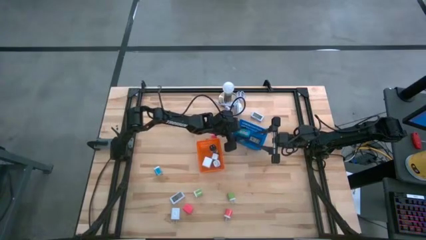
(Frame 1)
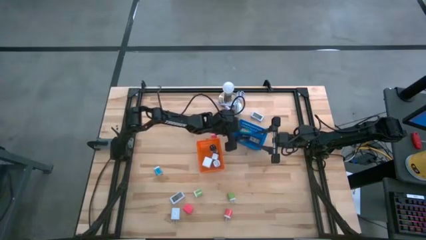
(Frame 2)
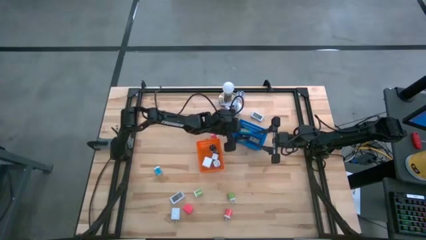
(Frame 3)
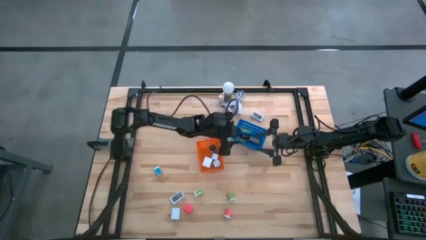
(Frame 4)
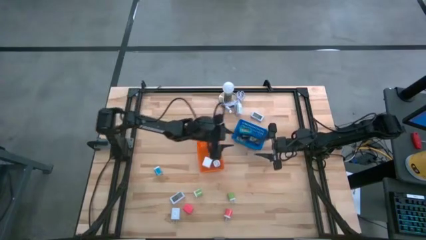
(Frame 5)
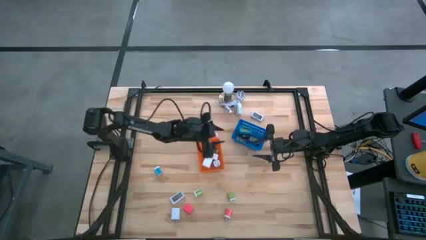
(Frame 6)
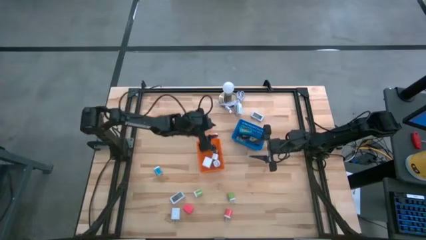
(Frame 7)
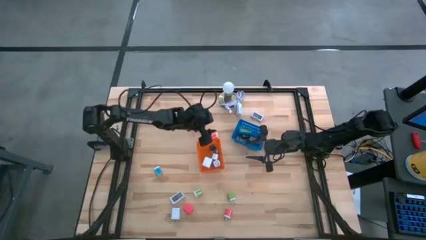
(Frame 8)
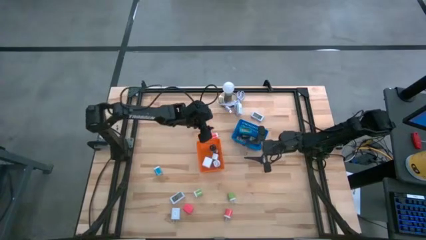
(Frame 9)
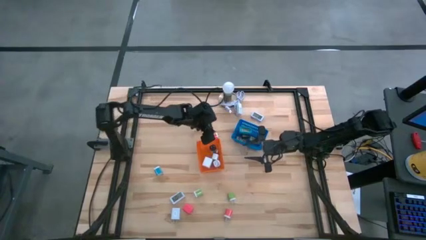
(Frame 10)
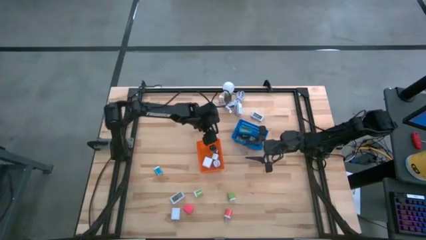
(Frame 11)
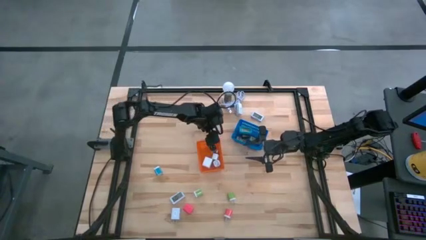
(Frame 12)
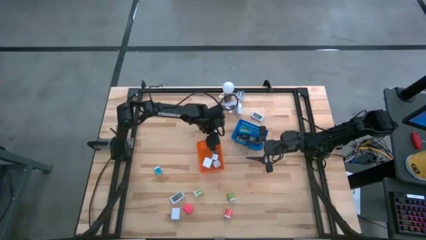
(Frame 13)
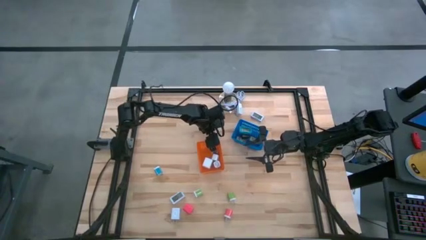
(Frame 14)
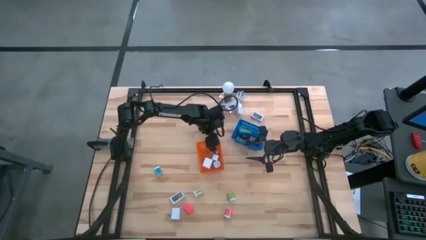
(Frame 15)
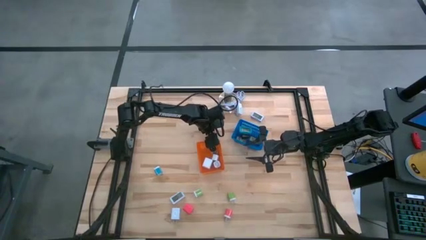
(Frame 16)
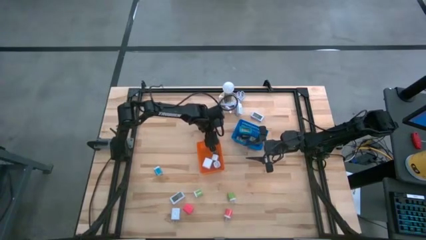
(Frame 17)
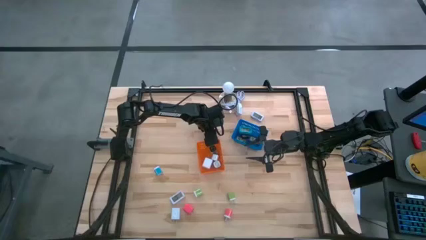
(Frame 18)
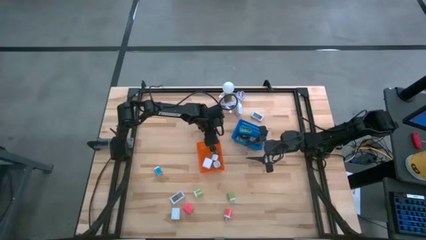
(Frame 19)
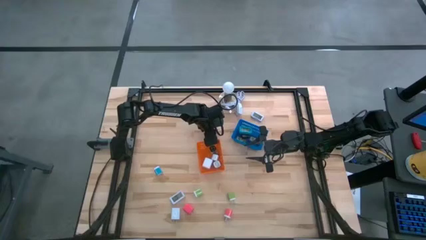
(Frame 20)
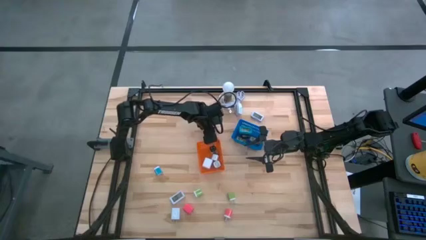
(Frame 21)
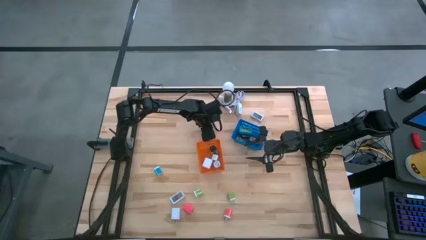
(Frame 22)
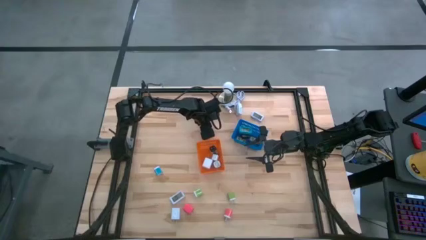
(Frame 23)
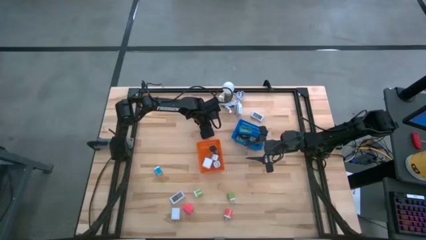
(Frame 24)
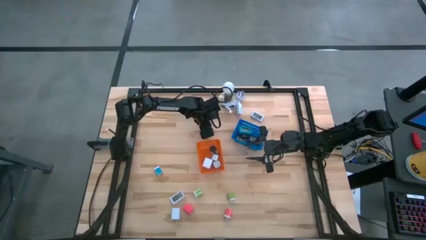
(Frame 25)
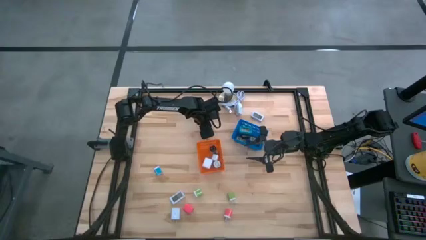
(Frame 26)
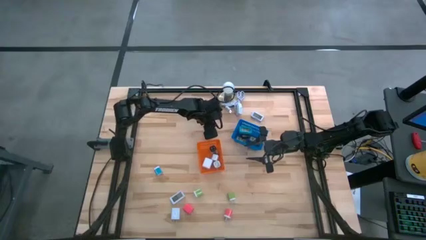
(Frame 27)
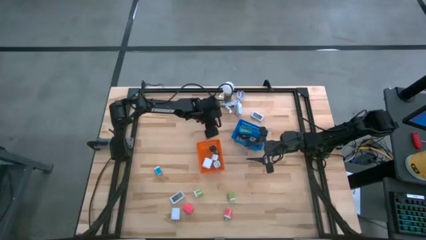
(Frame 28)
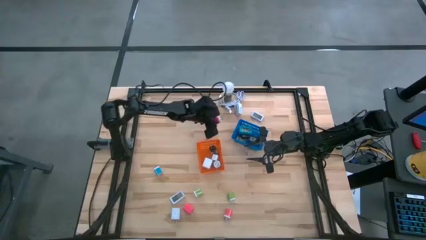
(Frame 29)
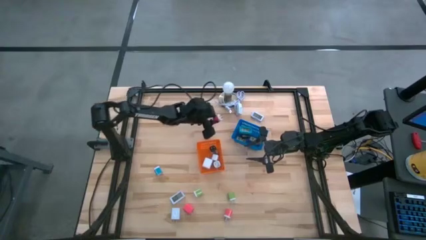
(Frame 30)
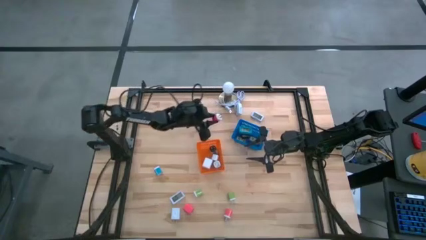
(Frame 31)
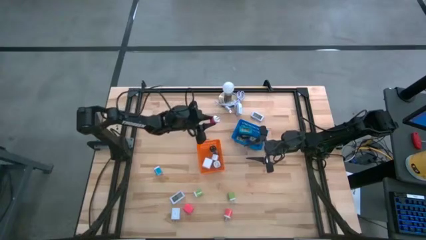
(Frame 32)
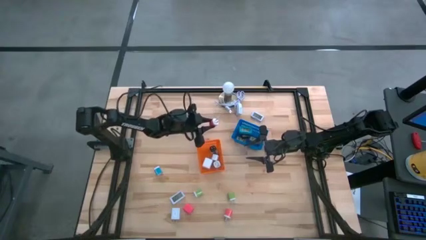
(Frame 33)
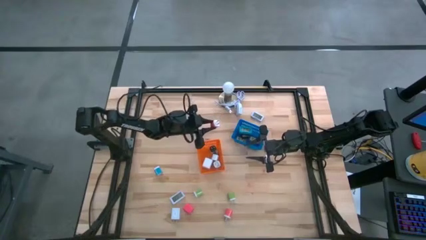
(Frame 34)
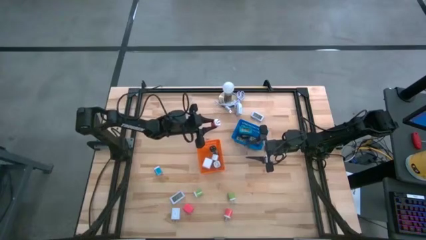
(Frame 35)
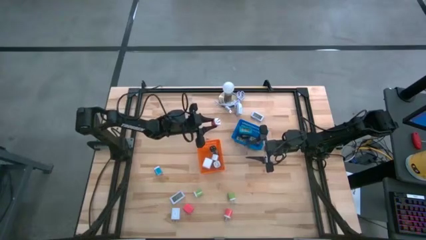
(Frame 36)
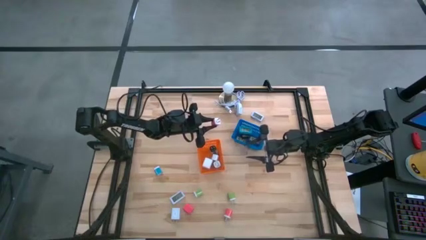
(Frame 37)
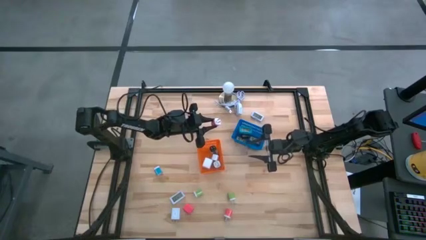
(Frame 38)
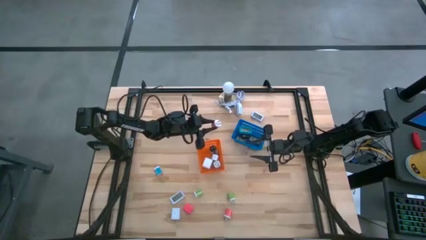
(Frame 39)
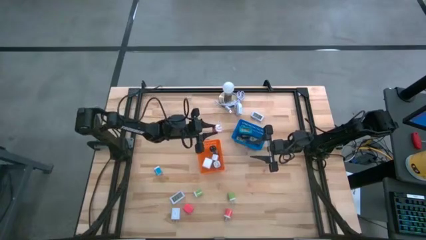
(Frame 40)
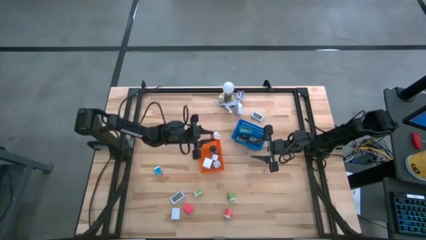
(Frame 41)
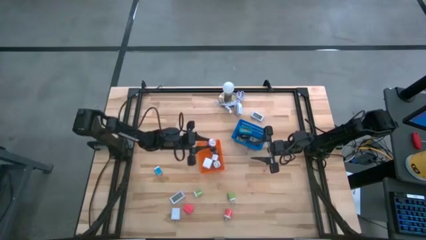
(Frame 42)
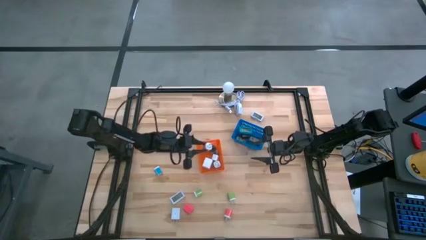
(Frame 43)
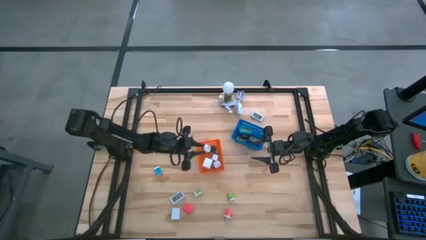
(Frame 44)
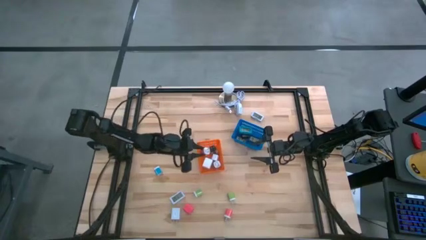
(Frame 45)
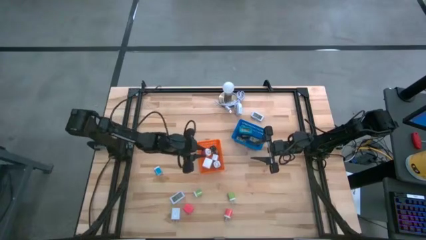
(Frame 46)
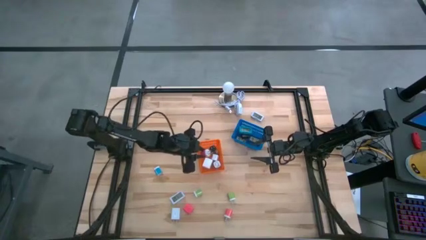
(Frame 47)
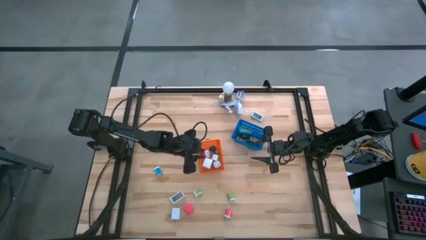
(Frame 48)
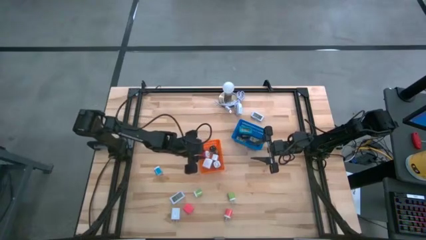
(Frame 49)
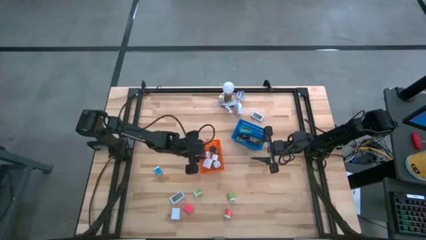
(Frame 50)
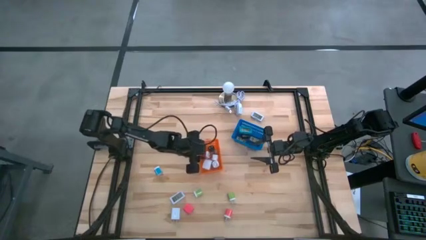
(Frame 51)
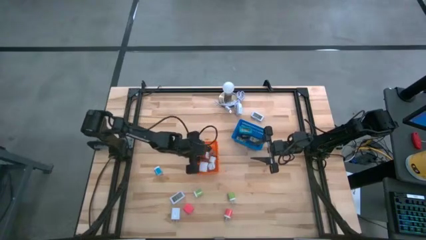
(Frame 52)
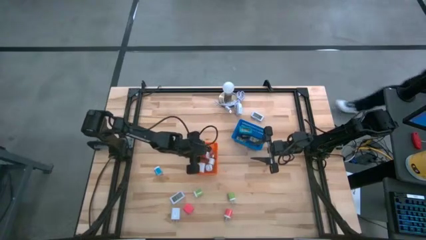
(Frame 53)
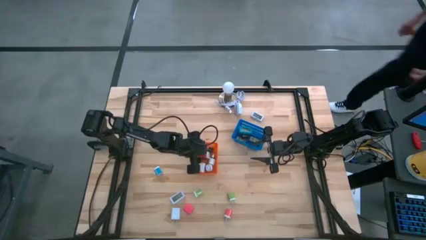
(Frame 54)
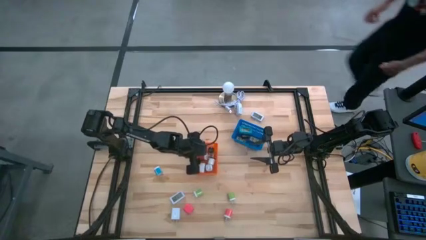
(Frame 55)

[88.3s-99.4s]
Task: Pick & Place Office items
Put the top pink white charger adapter into the orange bin

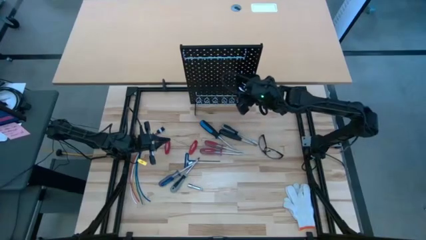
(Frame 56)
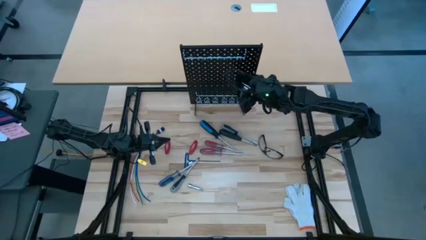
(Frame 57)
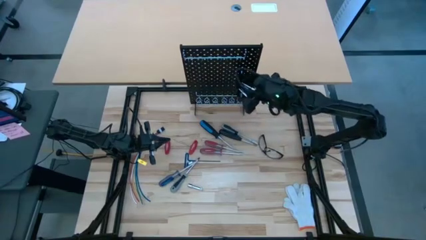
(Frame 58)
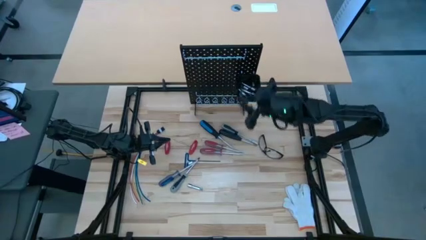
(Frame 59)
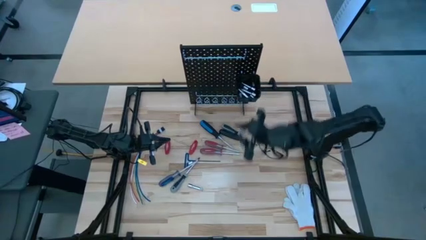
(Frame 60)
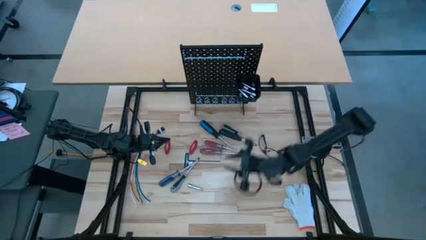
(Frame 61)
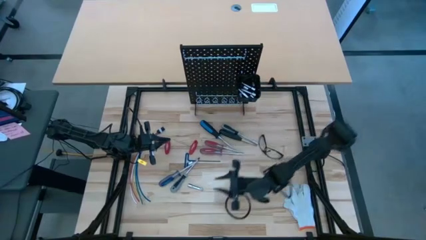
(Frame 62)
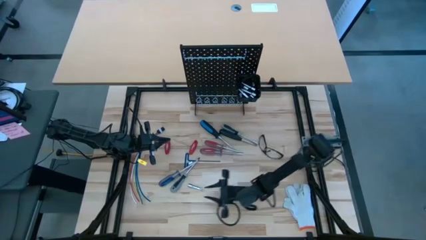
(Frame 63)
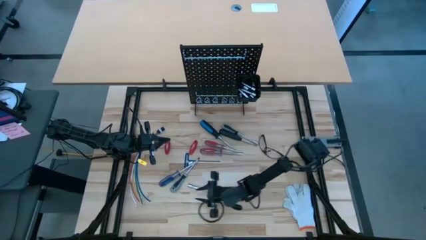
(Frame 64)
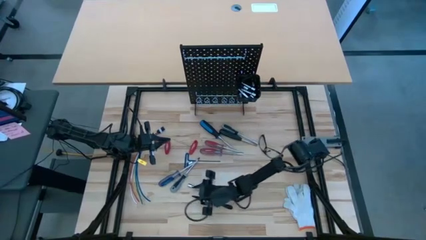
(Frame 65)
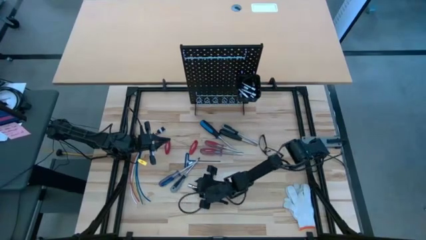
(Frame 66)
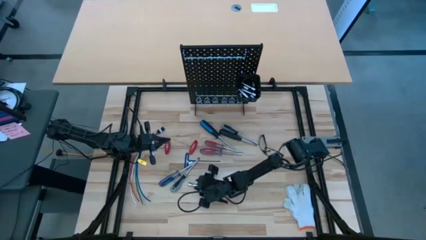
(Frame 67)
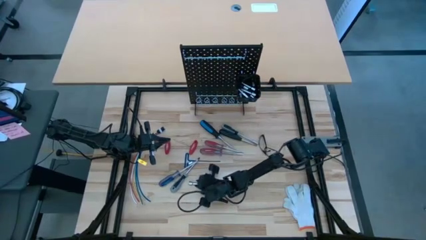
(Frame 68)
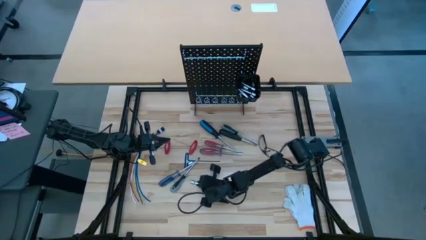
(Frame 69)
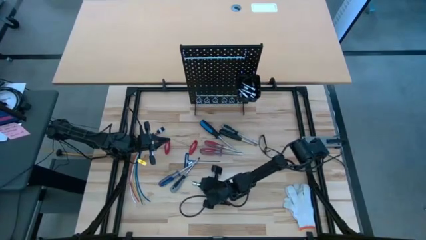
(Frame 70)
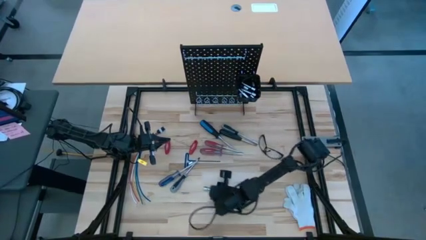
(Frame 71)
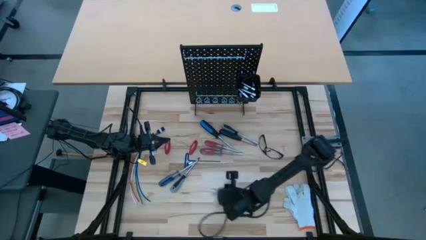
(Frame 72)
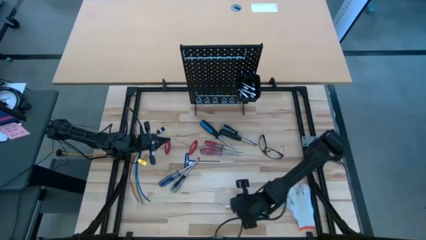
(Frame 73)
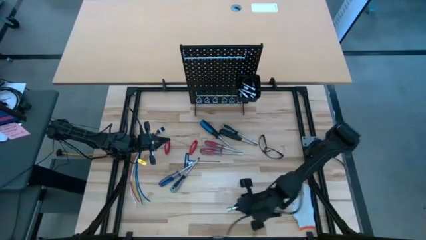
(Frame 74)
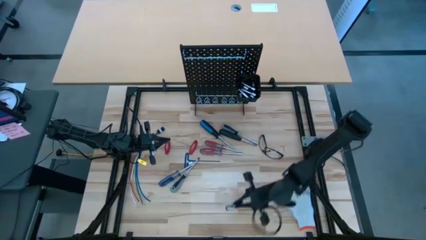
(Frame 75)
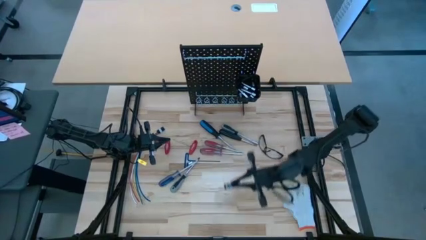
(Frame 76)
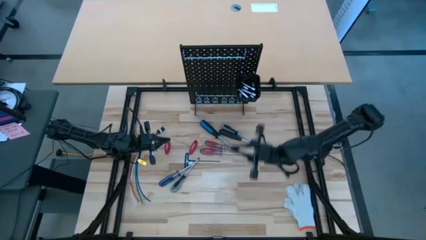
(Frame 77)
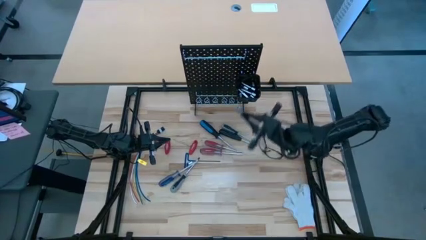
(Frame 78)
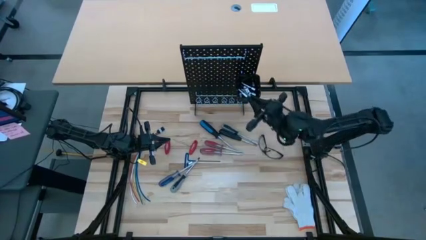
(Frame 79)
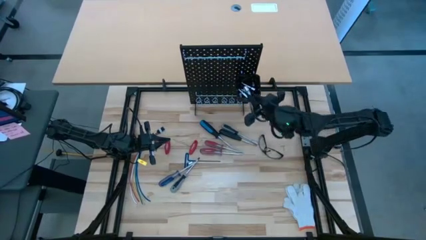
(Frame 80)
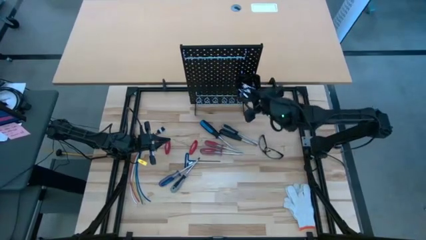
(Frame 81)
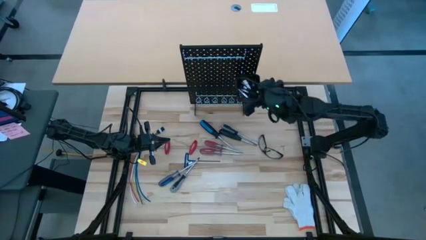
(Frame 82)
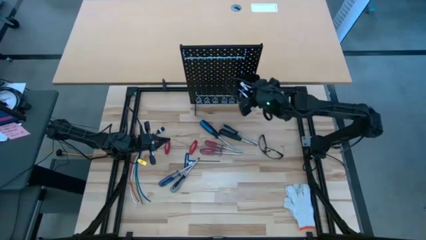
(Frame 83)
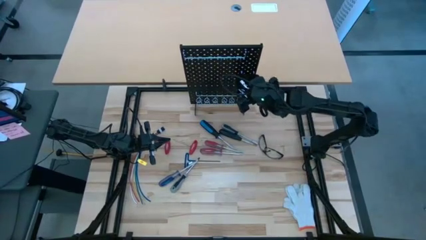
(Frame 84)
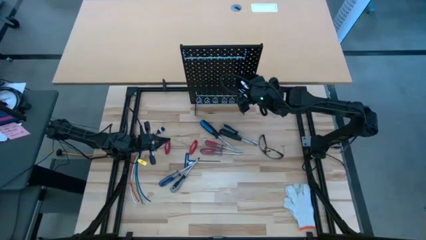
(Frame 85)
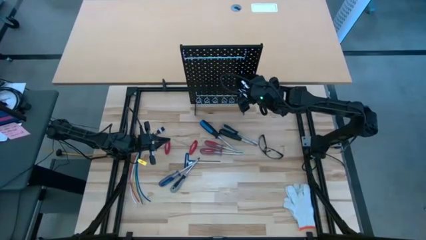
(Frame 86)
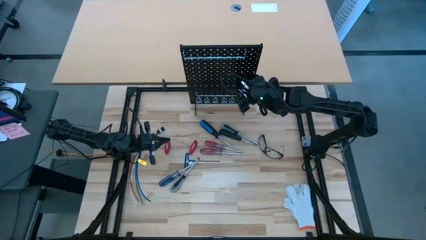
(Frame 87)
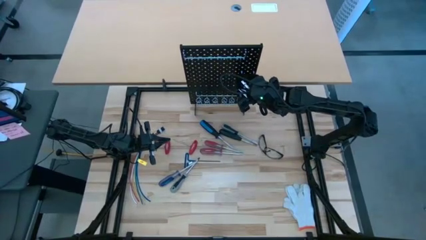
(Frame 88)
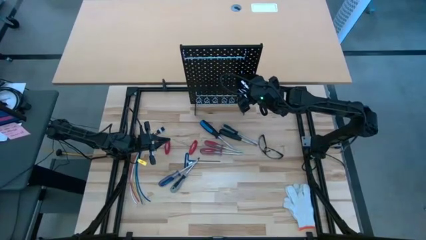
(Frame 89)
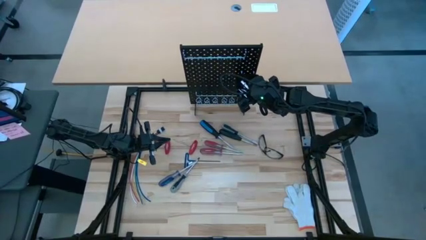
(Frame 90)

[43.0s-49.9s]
Task: Hang tools onto peg board
Put the extension bar into the bin of the pegboard
